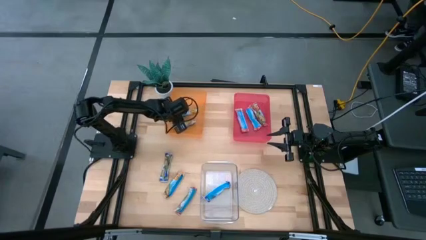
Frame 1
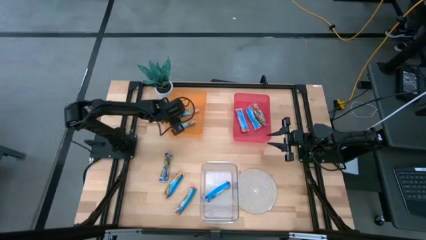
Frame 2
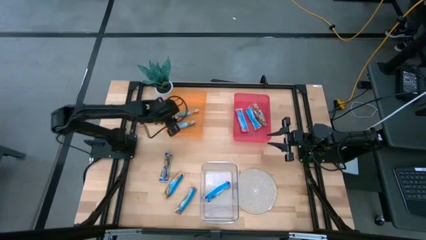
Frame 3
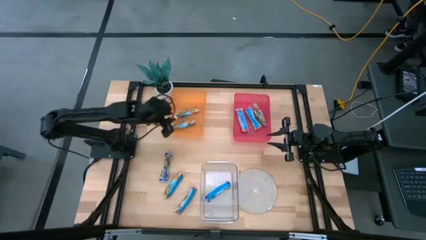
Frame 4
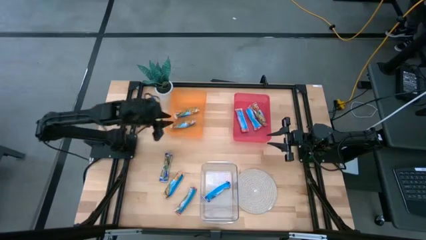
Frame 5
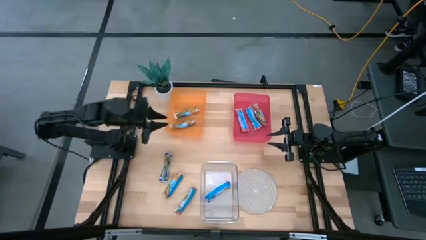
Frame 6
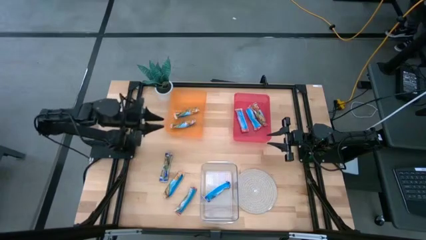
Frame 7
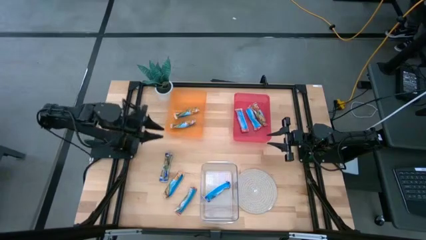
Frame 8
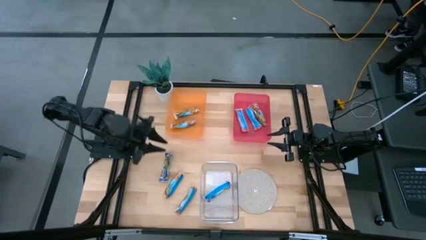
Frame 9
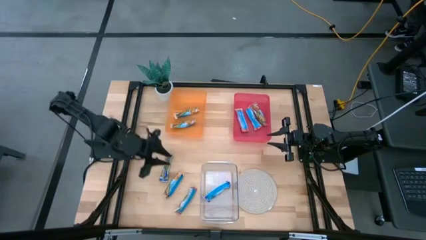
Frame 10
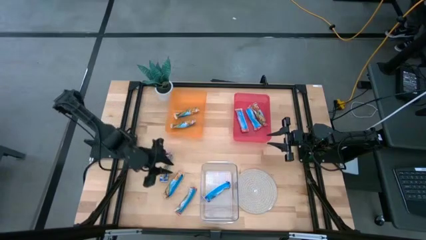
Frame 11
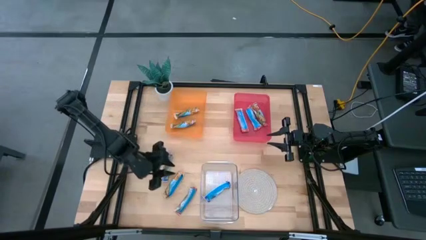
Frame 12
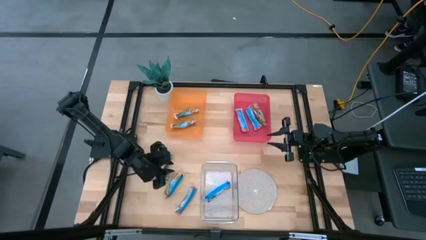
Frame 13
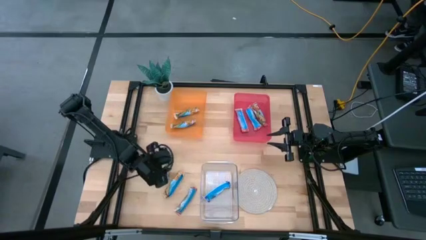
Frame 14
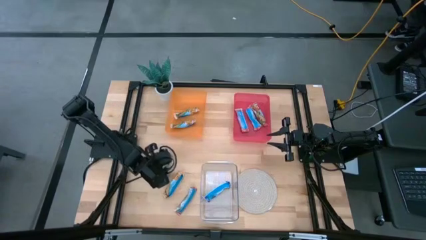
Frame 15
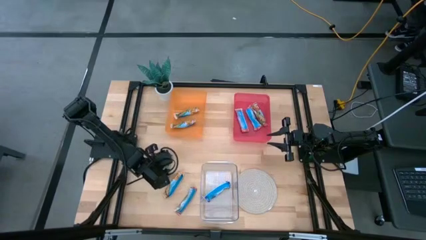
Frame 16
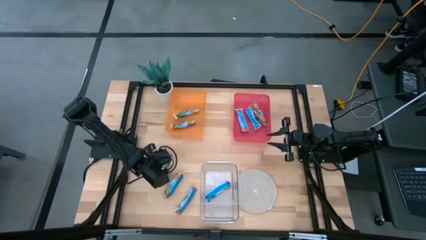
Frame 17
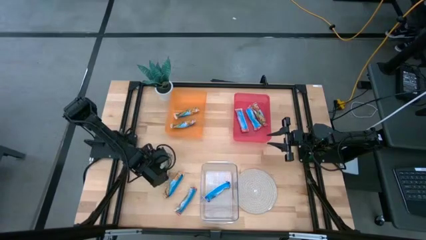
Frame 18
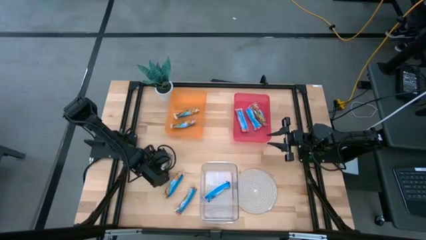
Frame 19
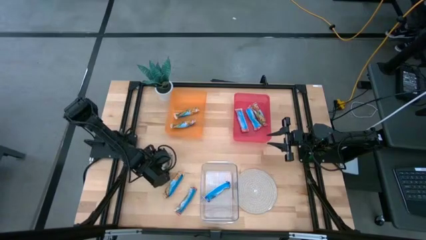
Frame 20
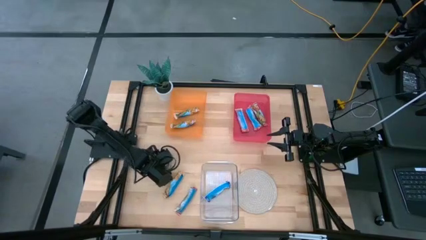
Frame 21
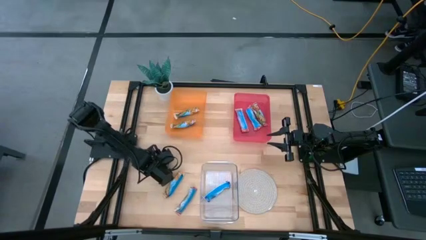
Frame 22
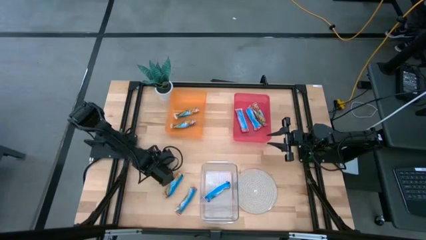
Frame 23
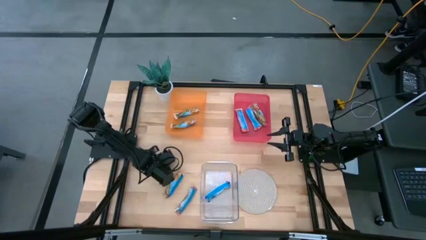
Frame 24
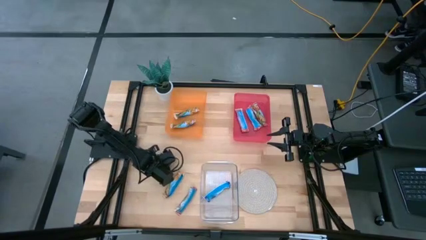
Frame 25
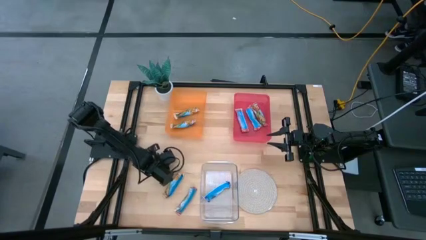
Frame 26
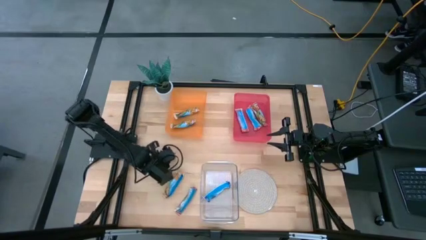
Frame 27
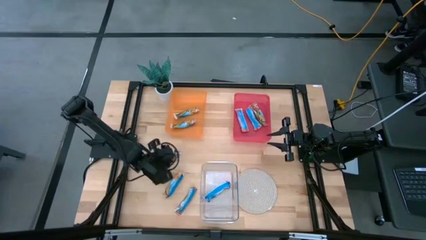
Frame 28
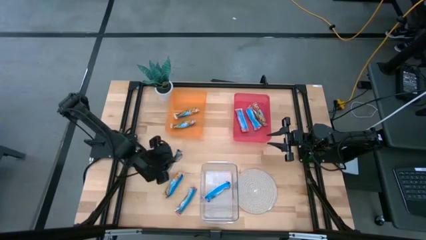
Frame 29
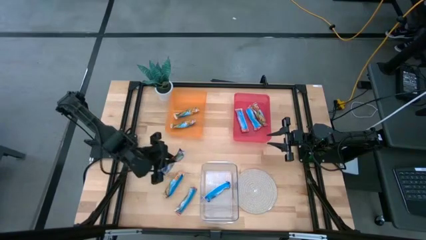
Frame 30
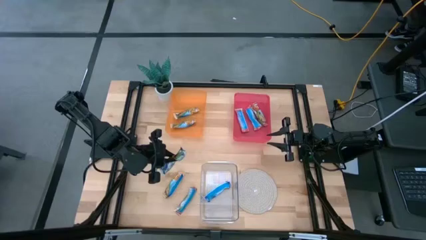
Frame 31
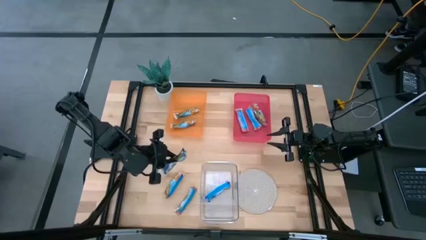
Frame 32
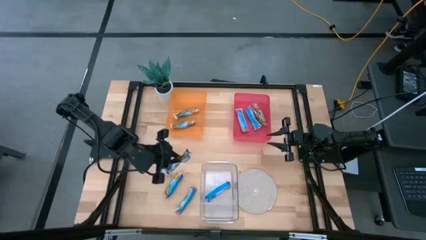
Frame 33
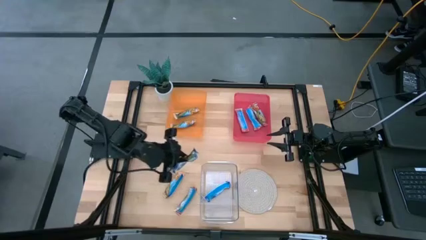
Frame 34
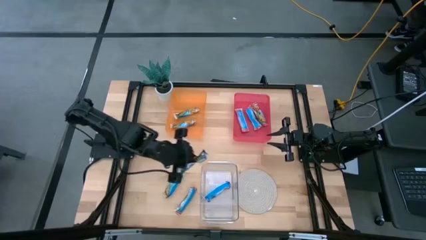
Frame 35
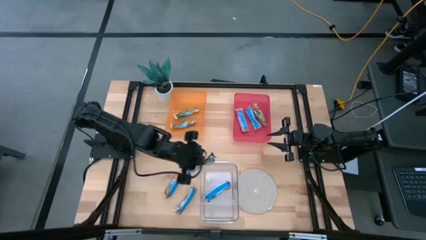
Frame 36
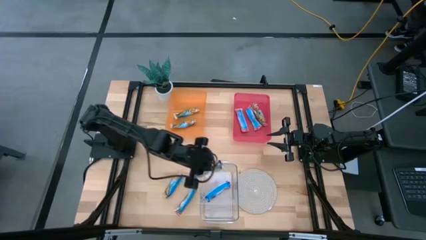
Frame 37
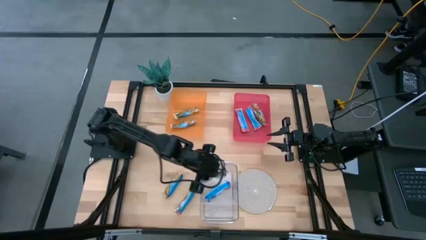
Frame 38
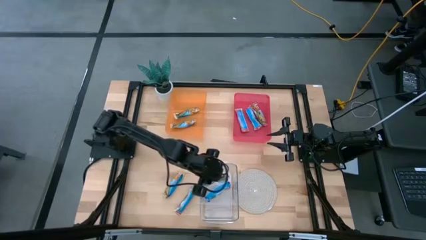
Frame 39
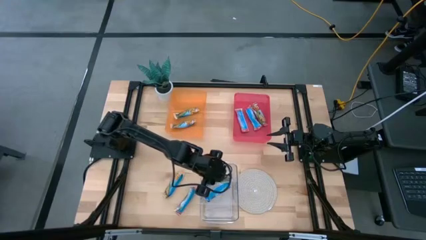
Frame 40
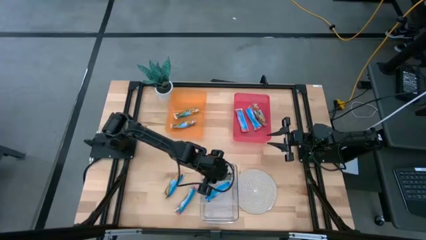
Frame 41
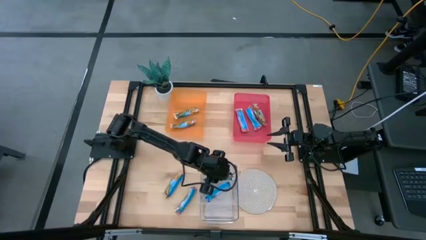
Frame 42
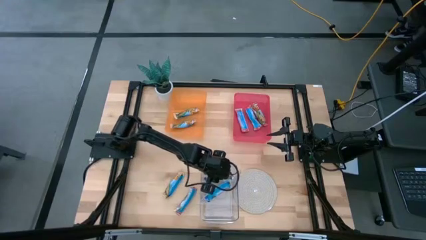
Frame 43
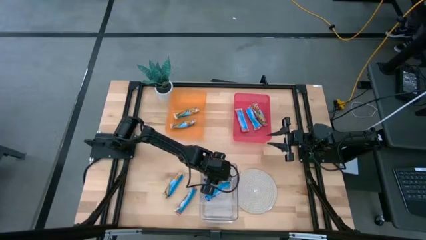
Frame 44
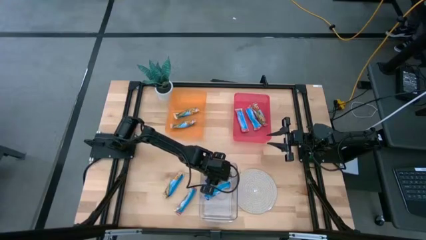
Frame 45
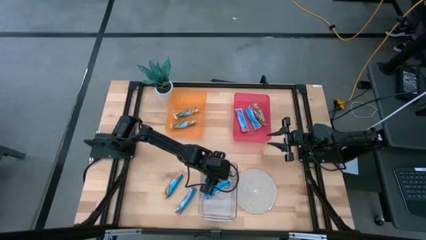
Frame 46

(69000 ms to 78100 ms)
Task: Pick and place Granola Bars by type
Put the blue granola bar into the transparent bin

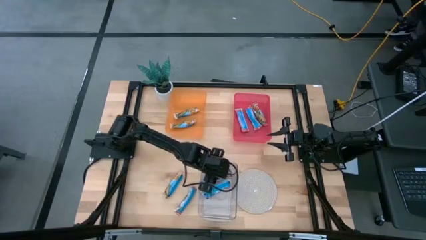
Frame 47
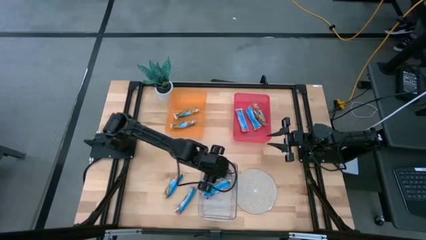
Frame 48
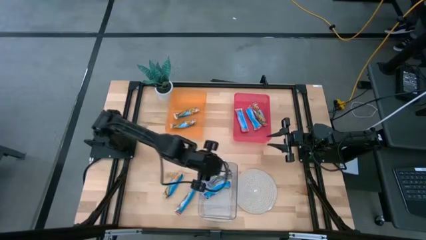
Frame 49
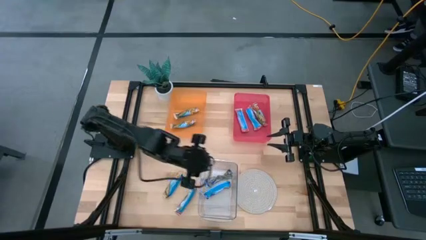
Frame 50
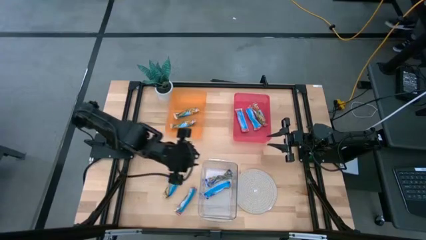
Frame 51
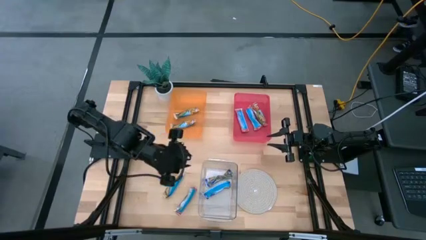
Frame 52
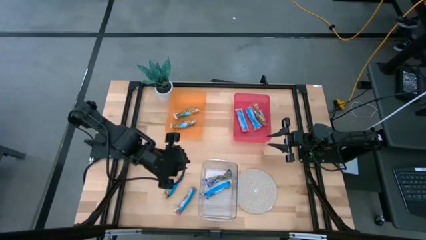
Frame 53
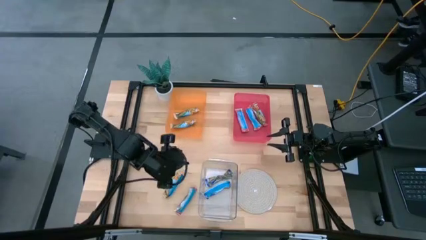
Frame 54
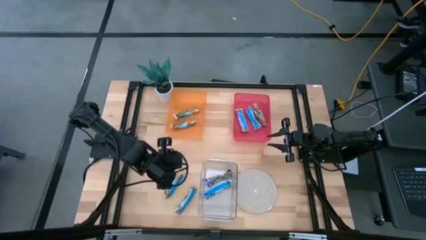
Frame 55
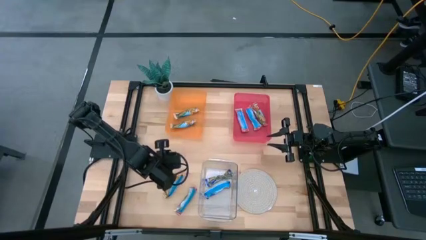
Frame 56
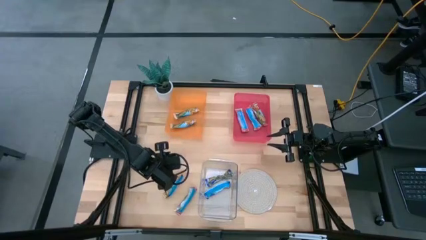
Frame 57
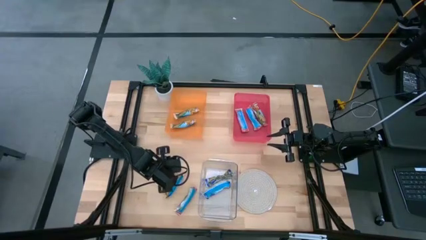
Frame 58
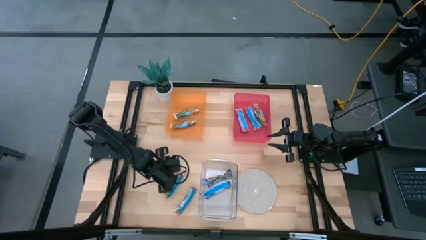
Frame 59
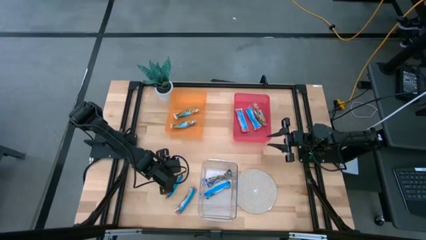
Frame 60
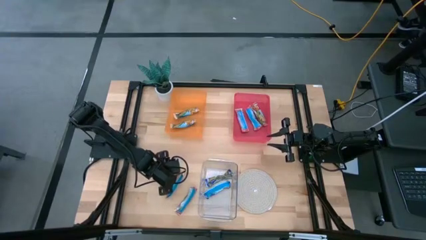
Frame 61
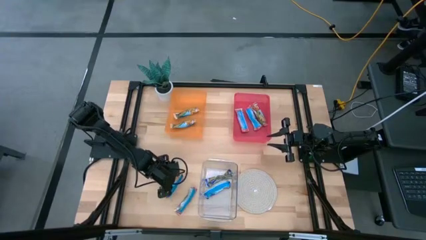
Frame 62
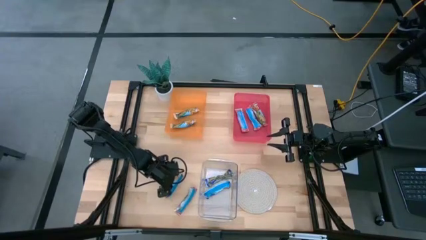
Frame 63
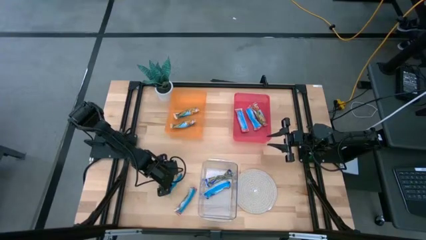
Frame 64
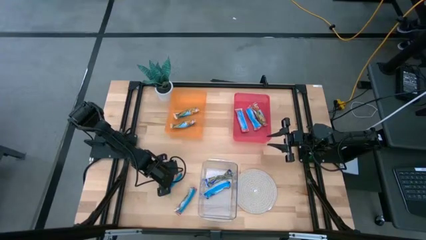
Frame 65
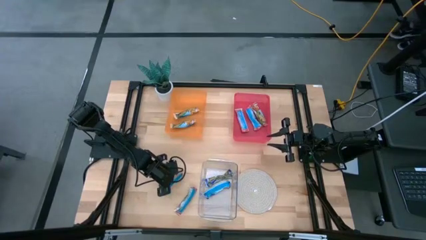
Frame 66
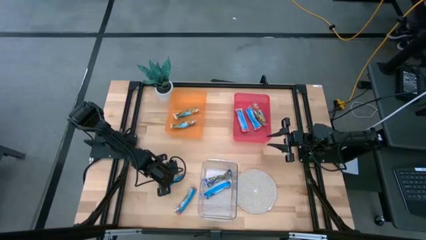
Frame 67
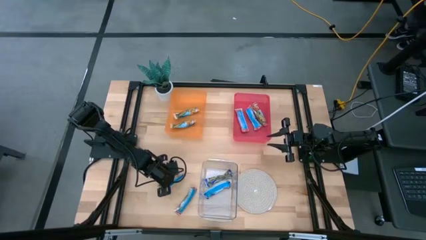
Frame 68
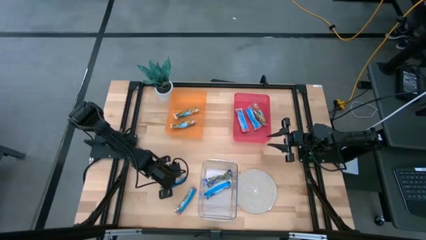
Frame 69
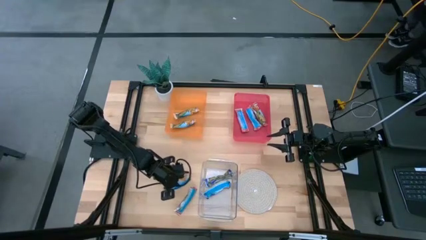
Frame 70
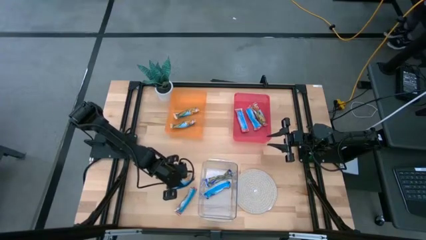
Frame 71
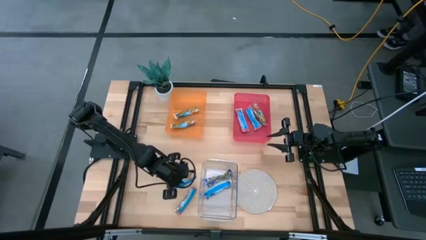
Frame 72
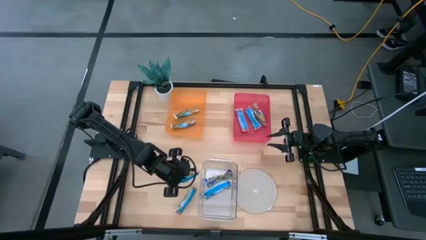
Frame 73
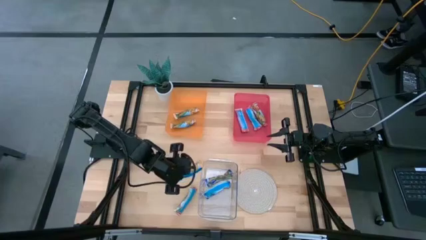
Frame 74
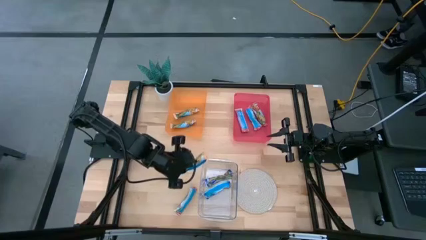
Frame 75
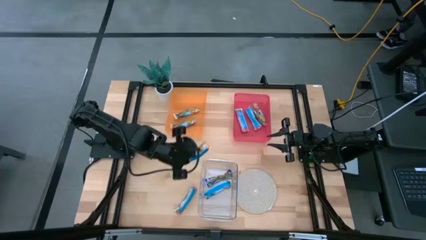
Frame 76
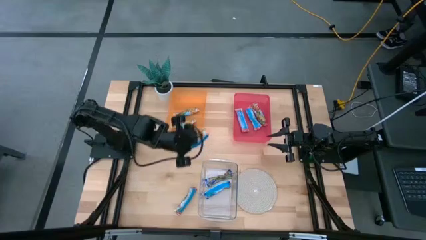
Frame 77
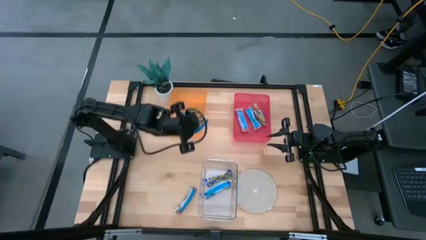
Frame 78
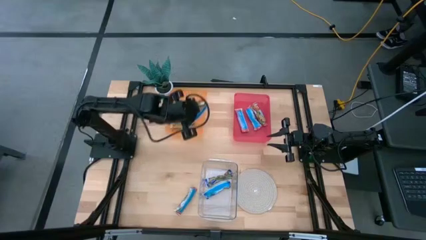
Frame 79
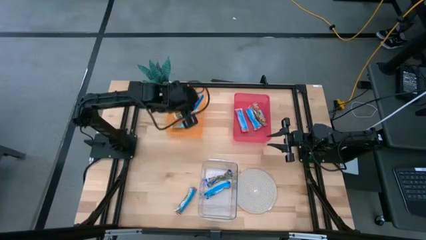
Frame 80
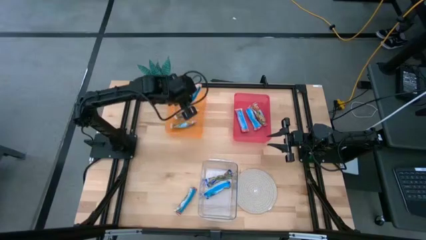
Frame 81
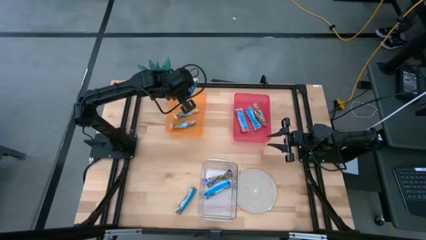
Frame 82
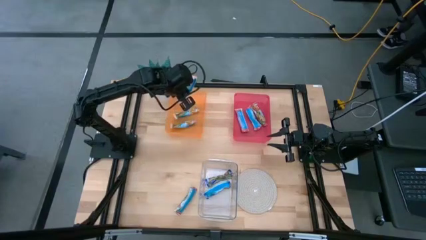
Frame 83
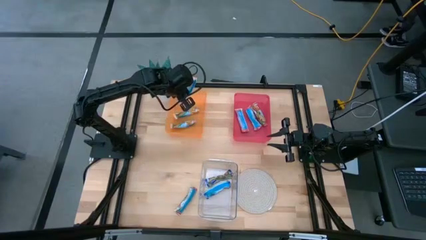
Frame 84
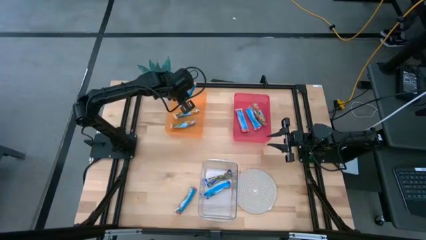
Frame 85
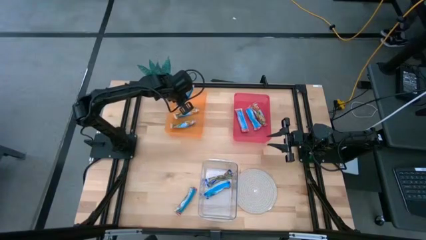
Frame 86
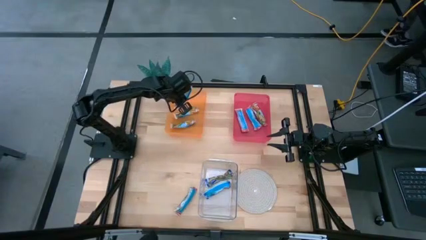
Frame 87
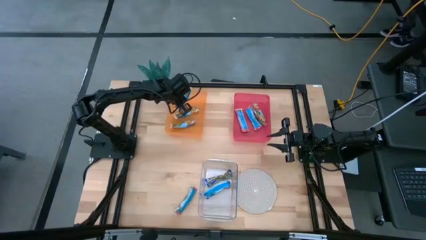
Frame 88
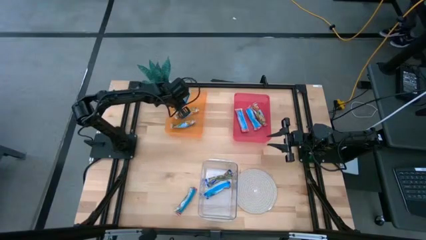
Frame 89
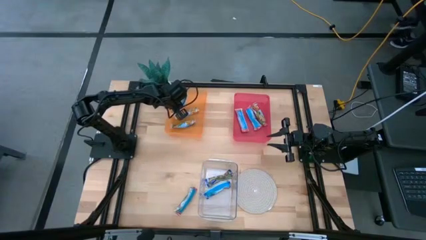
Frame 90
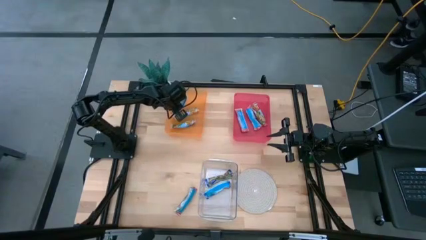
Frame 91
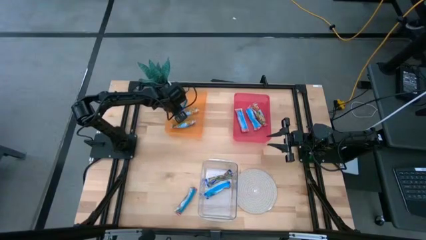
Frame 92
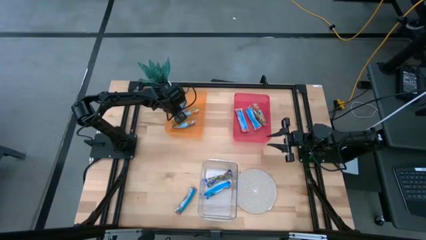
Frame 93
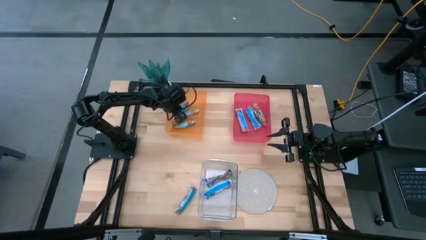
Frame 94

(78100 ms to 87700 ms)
Put the yellow granola bar into the orange bin
